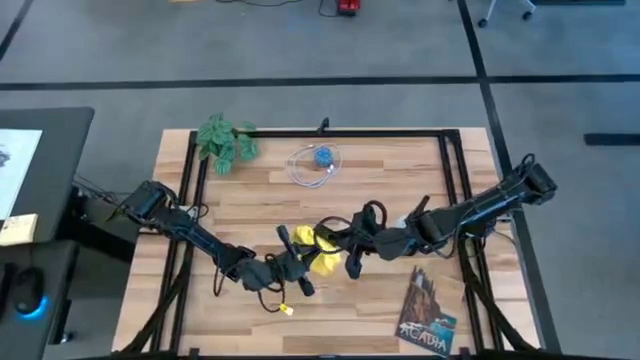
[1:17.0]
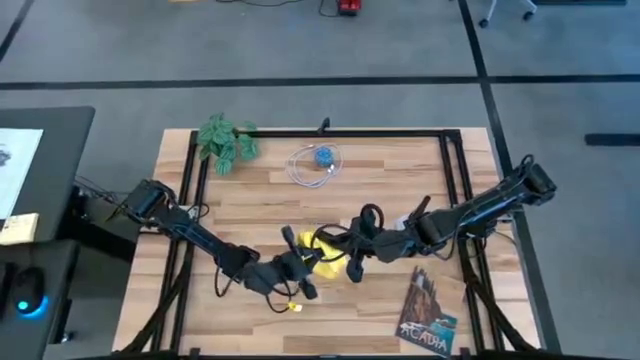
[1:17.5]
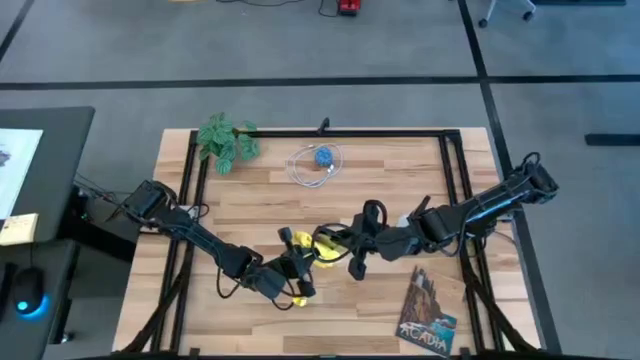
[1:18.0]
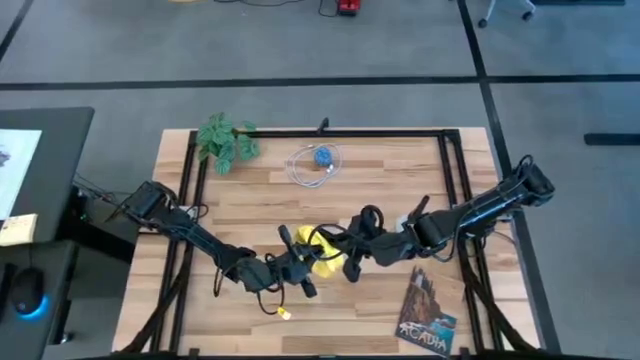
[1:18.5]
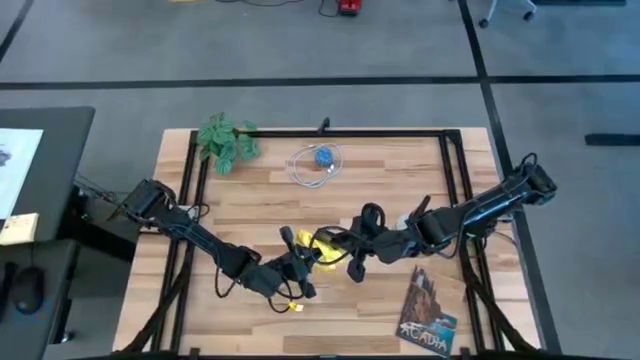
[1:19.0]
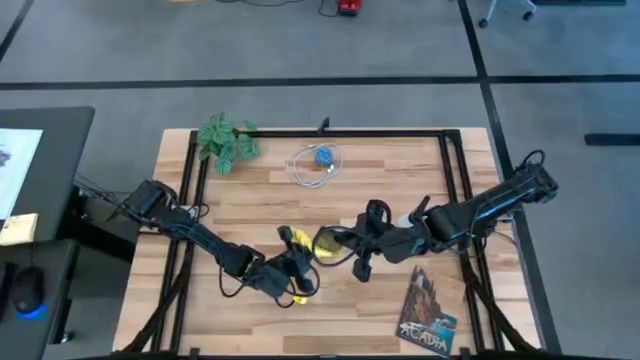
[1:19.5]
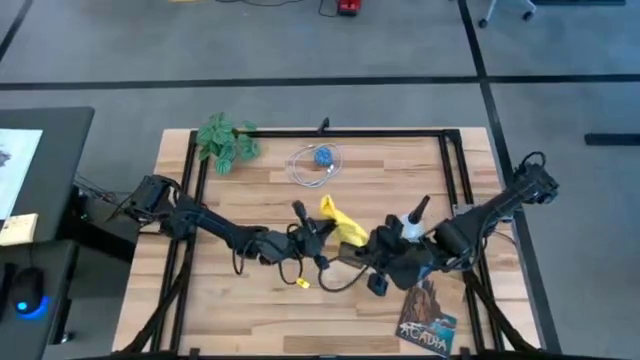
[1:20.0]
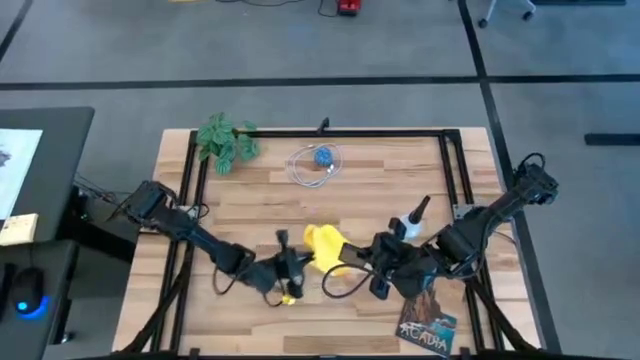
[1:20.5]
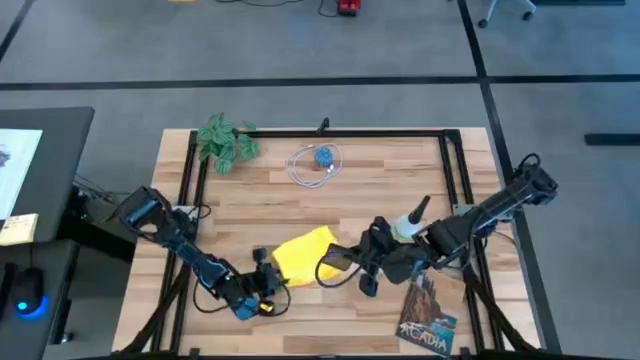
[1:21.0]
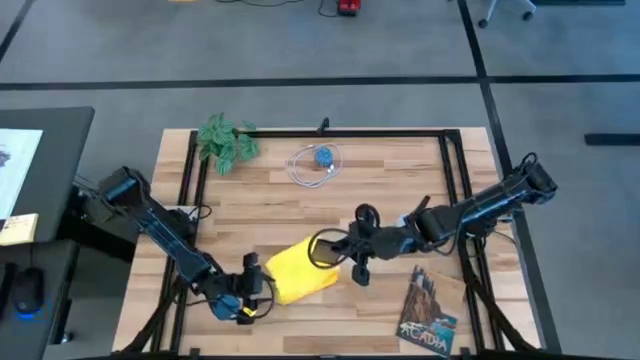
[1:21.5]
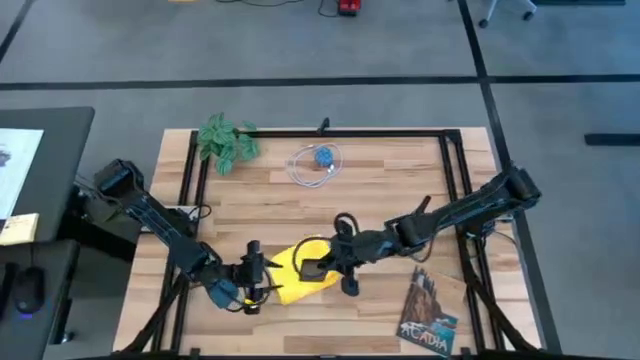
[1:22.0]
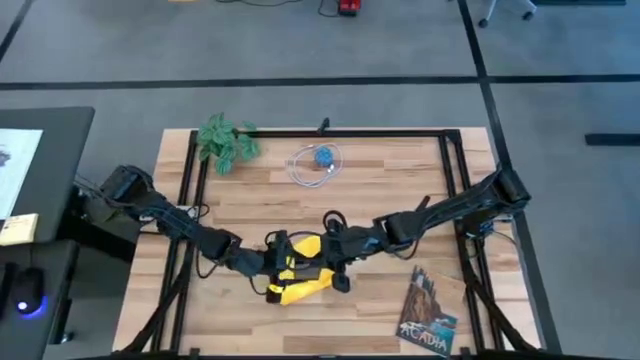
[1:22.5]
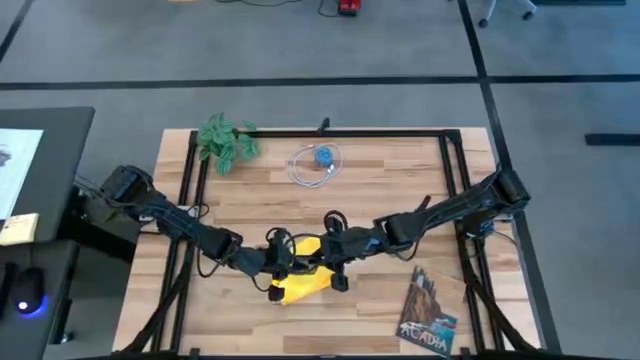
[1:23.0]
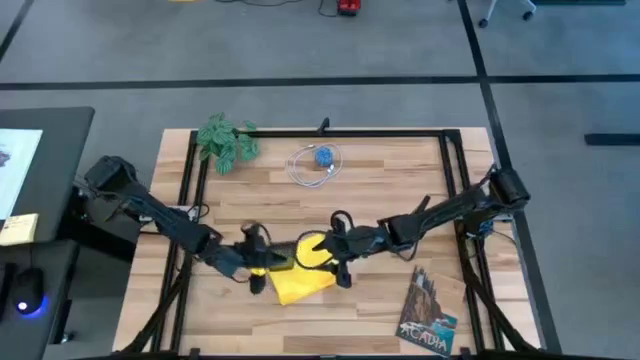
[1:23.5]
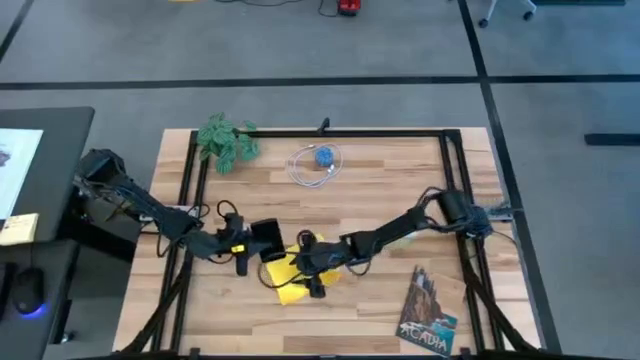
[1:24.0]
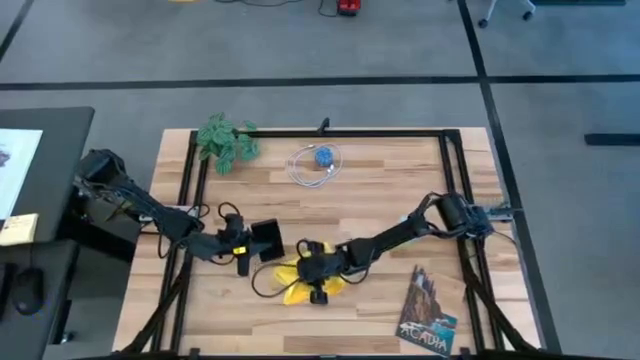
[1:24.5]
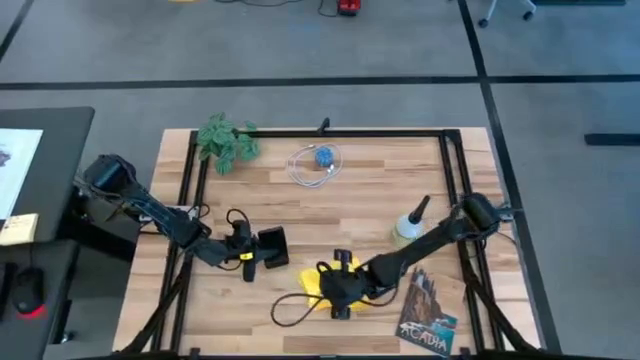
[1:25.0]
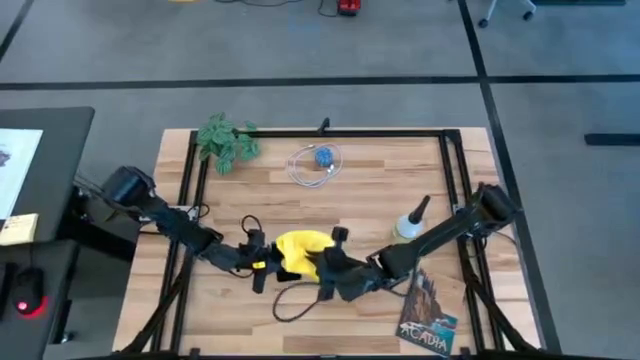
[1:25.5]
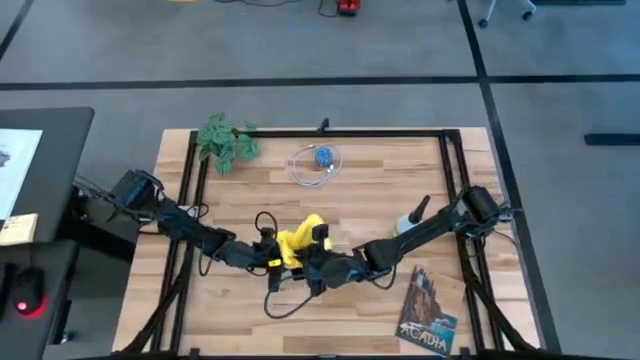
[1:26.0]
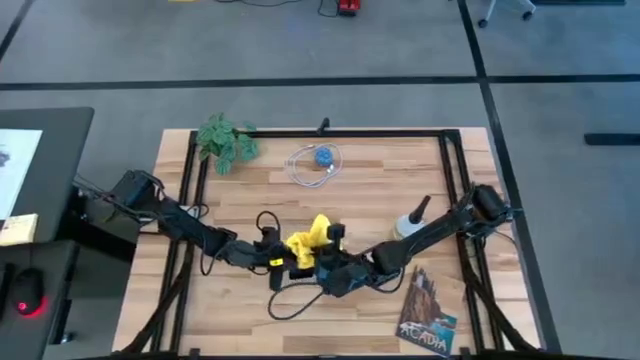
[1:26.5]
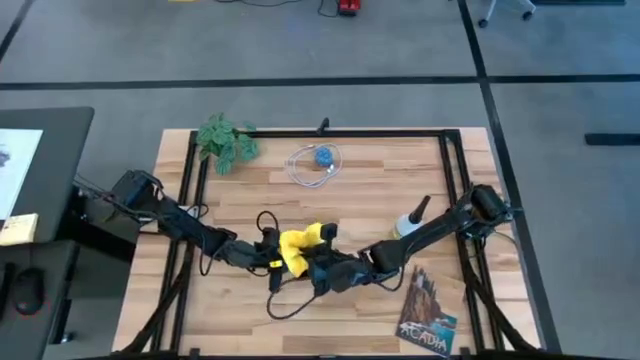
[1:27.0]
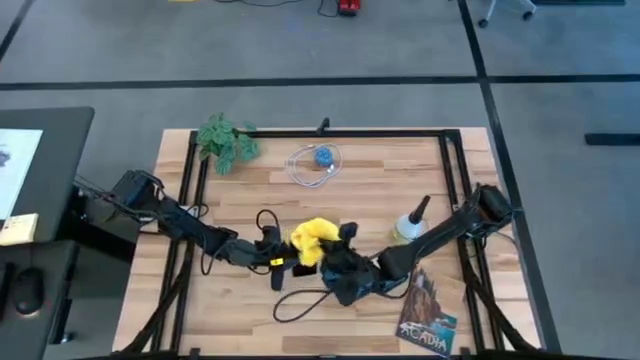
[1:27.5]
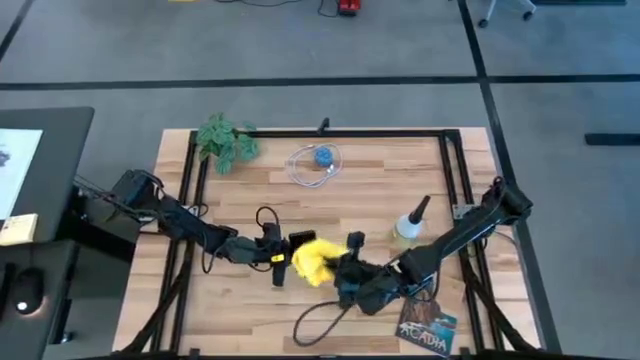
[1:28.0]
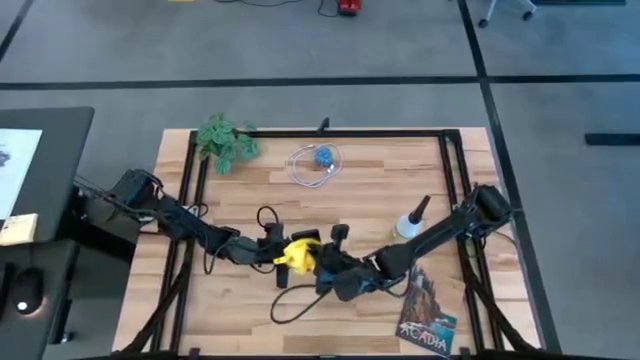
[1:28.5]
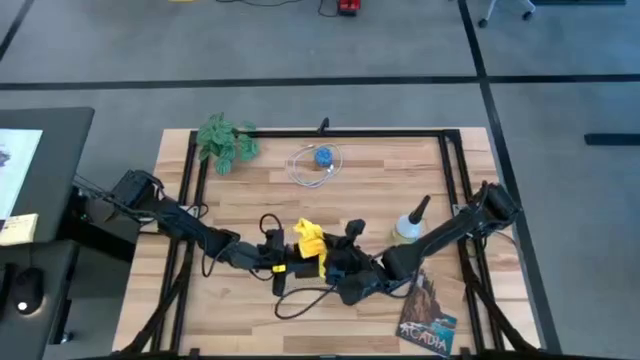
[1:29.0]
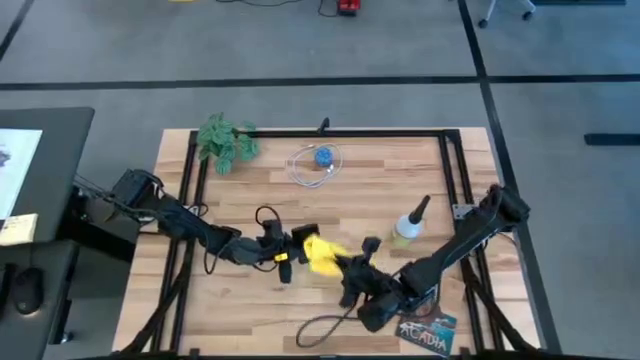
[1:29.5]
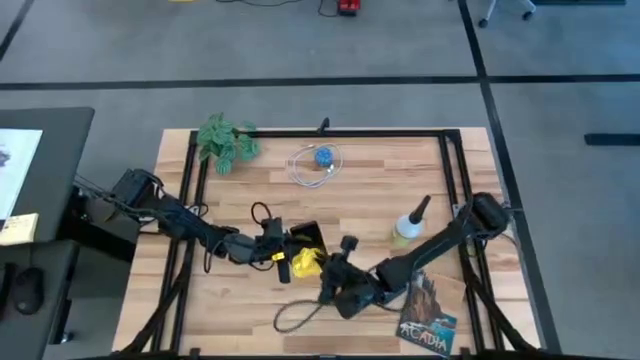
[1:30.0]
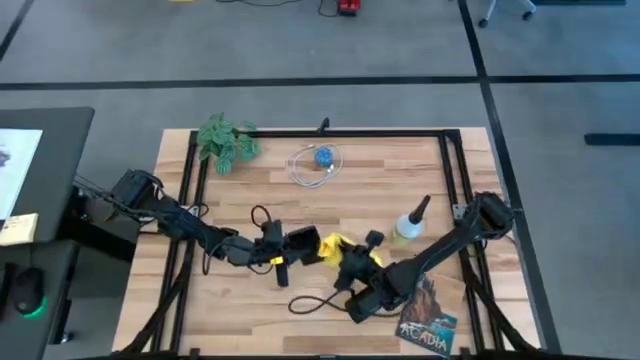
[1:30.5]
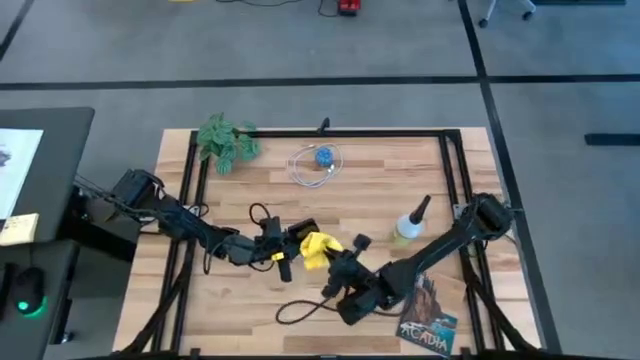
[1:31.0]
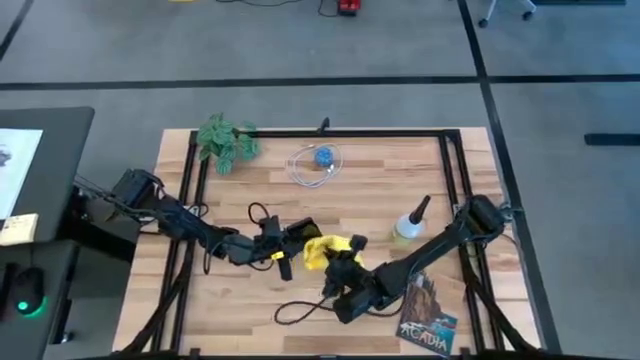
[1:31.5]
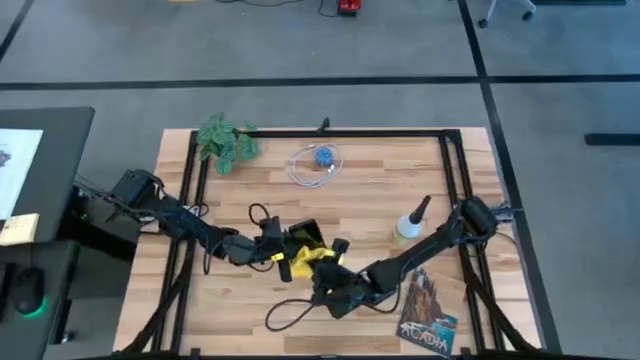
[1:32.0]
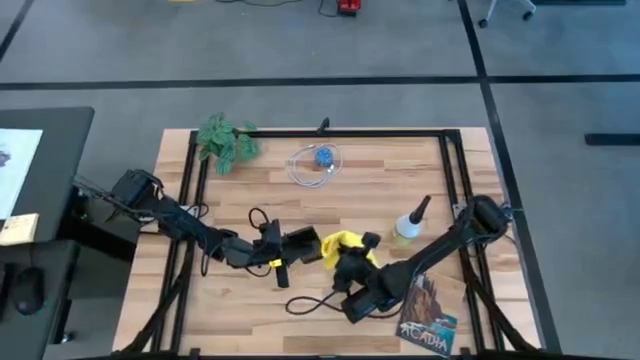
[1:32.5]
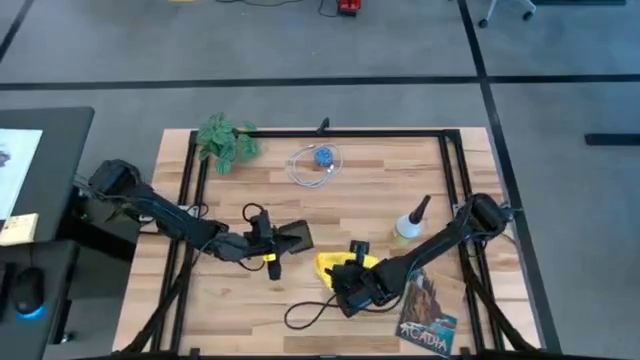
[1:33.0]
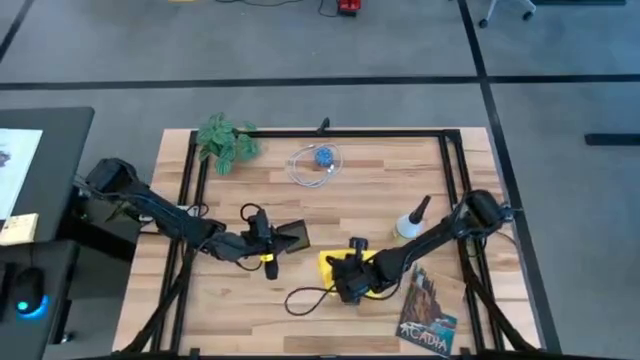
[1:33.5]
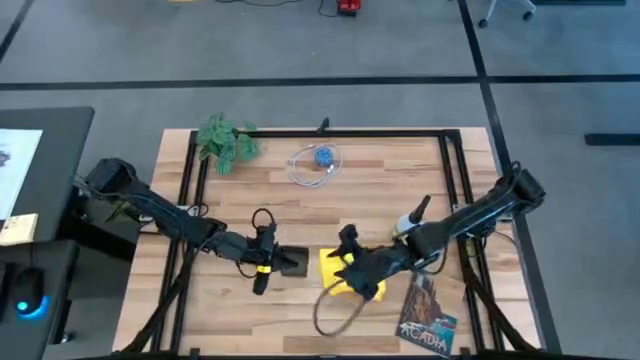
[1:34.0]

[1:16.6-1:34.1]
Task: Apply microfiber cloth
Wipe the front of the cellphone using a microfiber cloth
